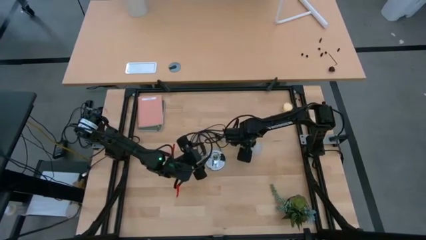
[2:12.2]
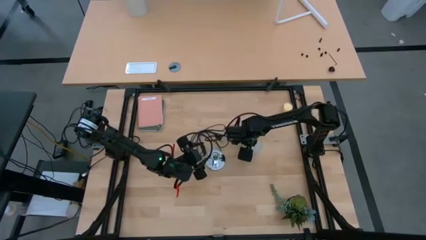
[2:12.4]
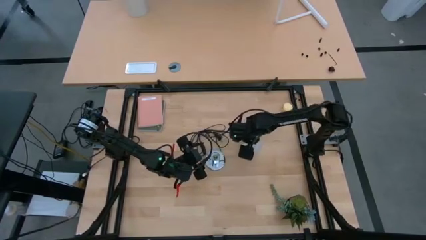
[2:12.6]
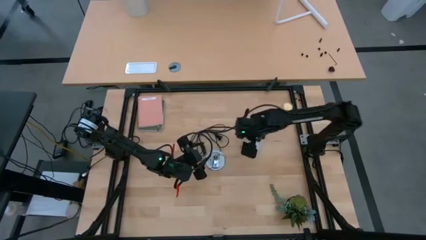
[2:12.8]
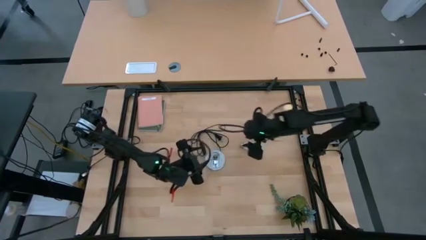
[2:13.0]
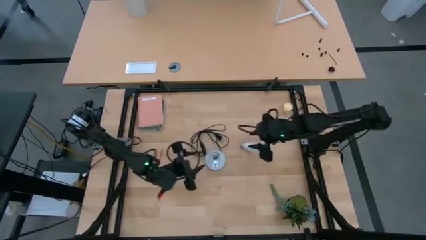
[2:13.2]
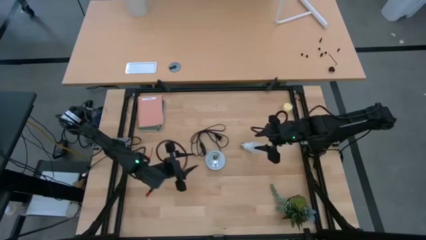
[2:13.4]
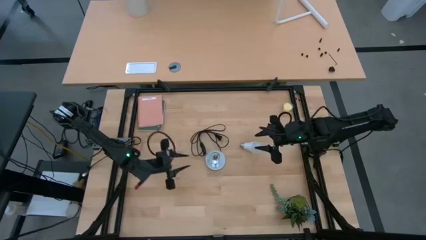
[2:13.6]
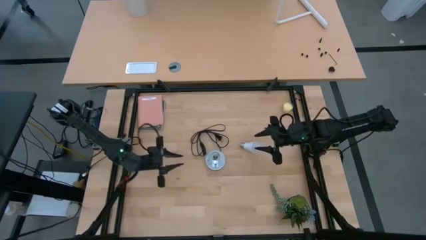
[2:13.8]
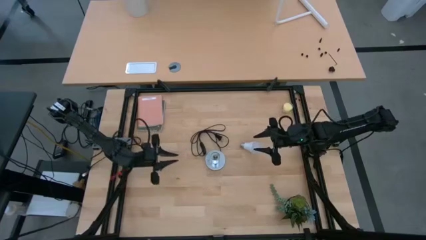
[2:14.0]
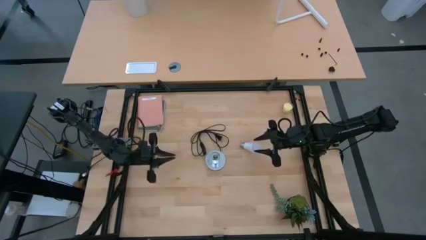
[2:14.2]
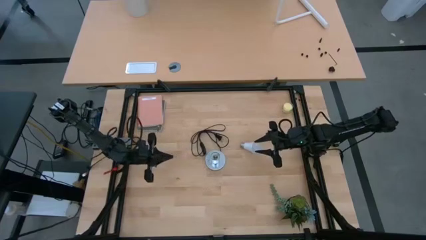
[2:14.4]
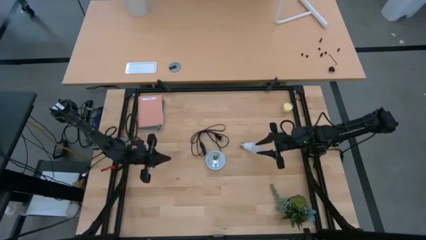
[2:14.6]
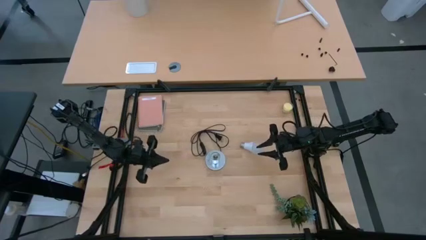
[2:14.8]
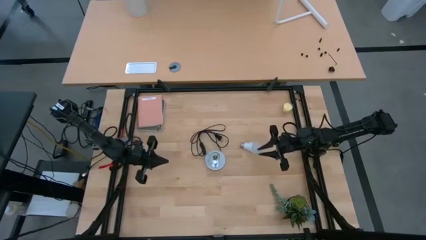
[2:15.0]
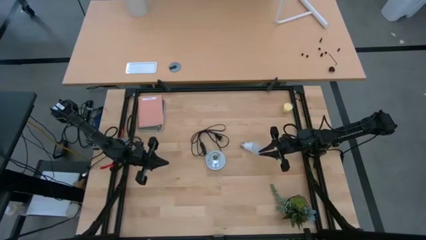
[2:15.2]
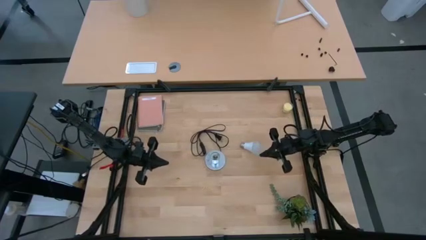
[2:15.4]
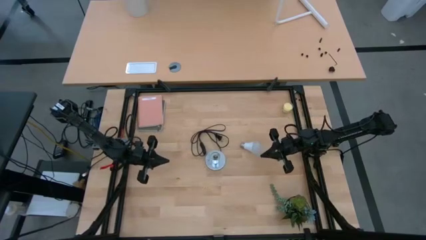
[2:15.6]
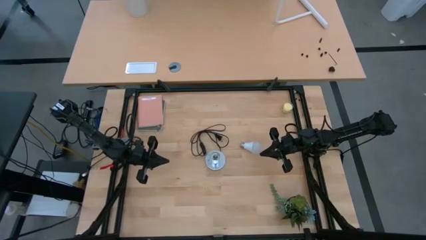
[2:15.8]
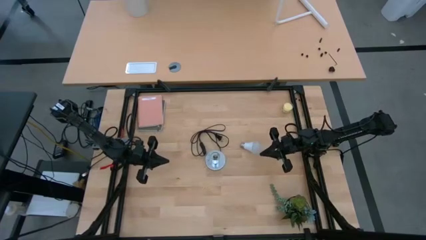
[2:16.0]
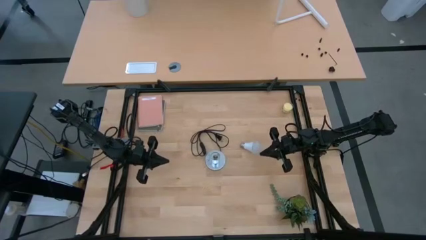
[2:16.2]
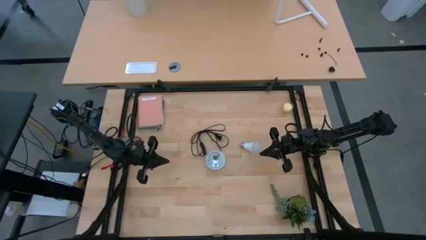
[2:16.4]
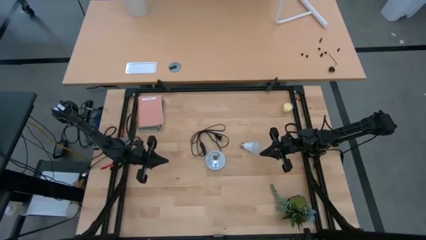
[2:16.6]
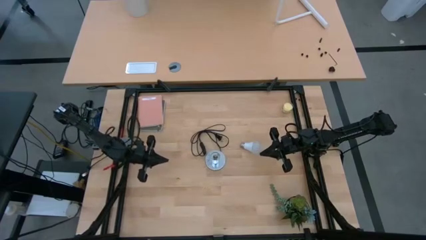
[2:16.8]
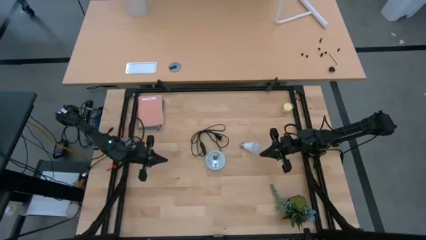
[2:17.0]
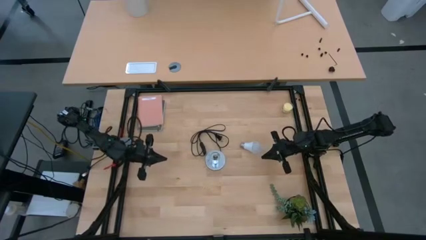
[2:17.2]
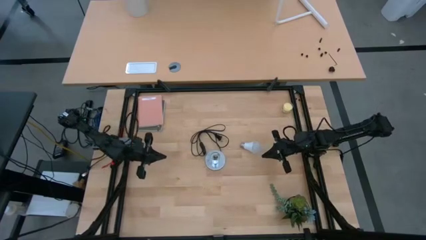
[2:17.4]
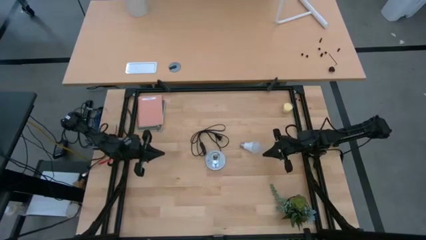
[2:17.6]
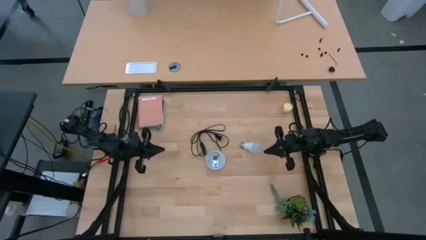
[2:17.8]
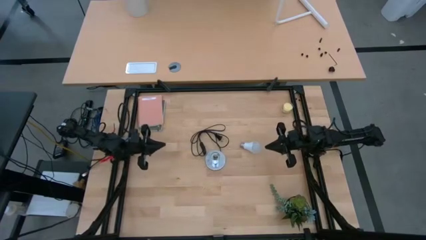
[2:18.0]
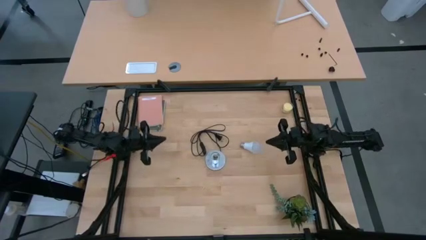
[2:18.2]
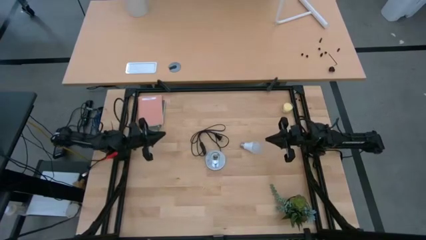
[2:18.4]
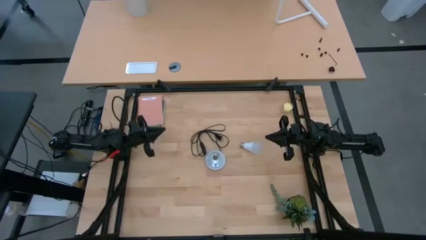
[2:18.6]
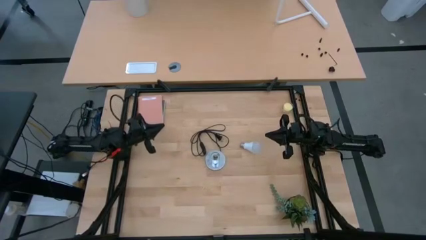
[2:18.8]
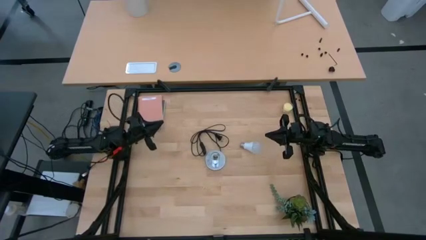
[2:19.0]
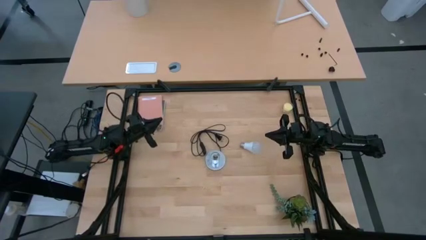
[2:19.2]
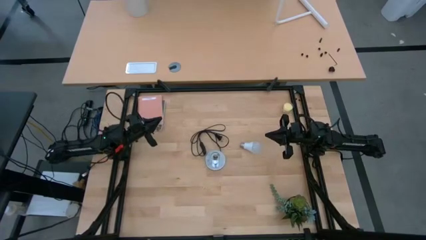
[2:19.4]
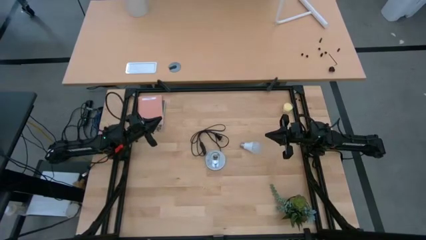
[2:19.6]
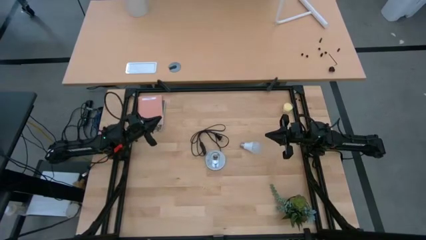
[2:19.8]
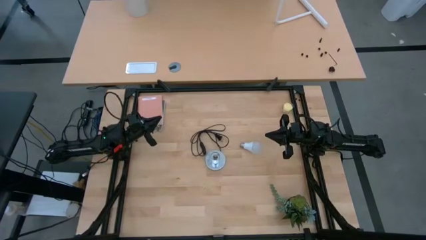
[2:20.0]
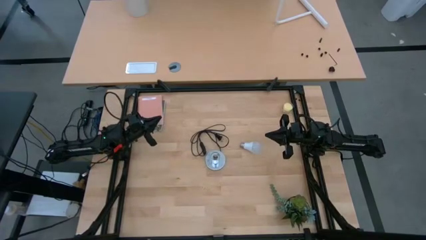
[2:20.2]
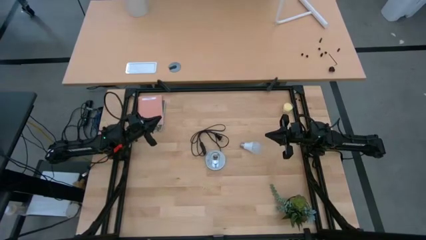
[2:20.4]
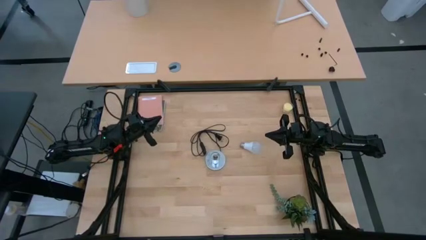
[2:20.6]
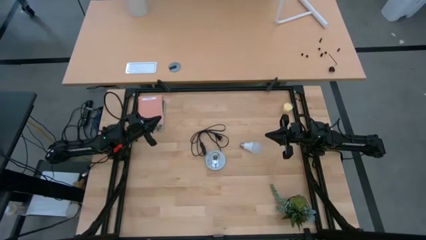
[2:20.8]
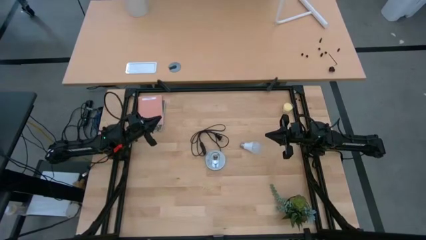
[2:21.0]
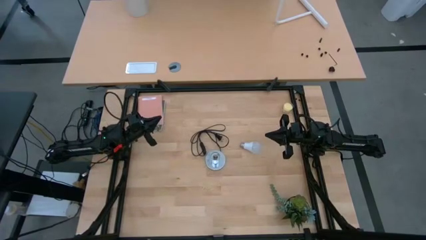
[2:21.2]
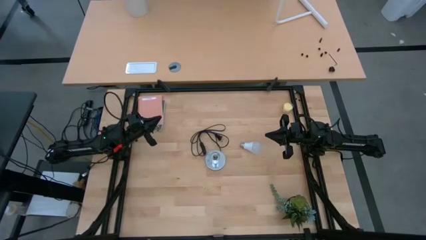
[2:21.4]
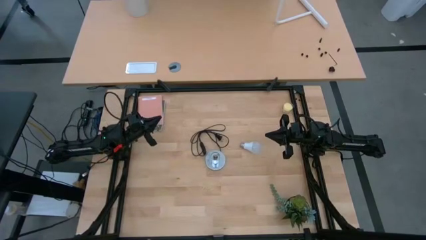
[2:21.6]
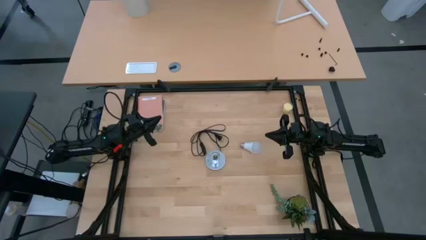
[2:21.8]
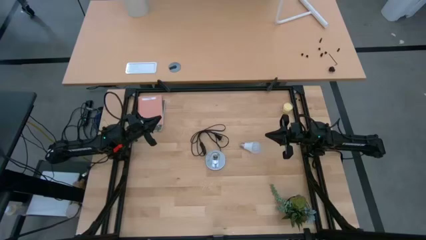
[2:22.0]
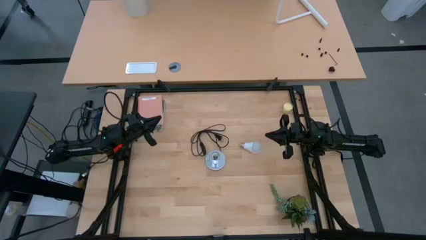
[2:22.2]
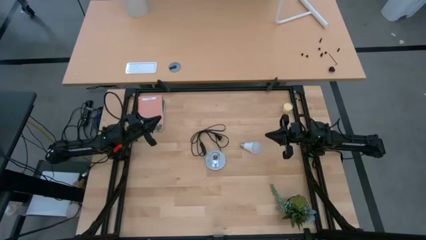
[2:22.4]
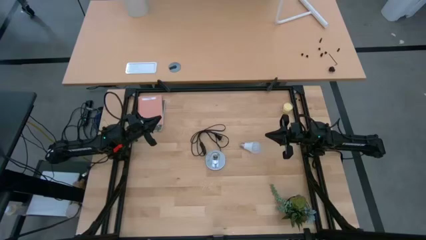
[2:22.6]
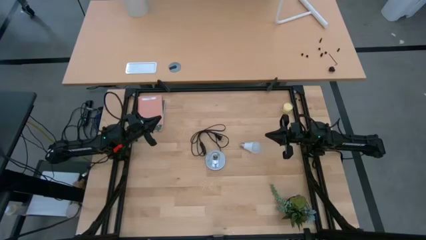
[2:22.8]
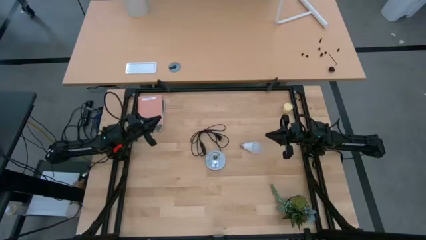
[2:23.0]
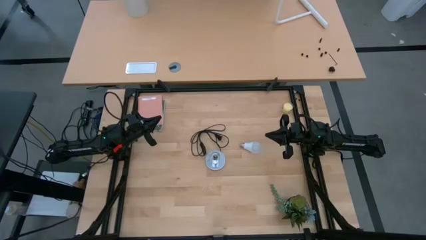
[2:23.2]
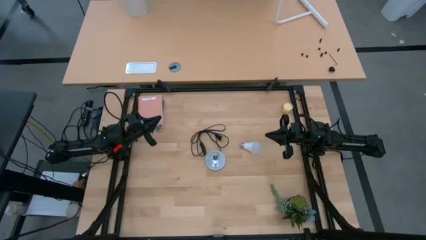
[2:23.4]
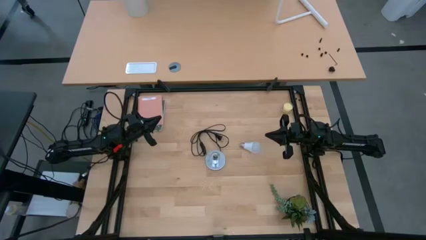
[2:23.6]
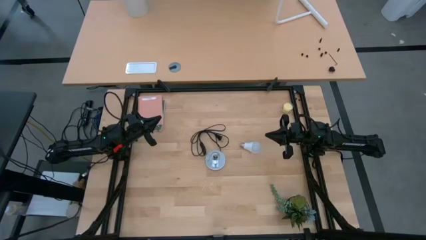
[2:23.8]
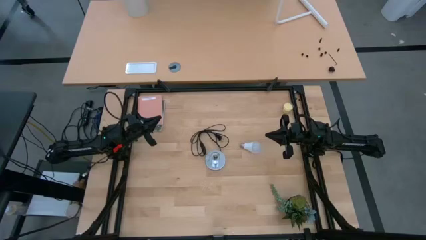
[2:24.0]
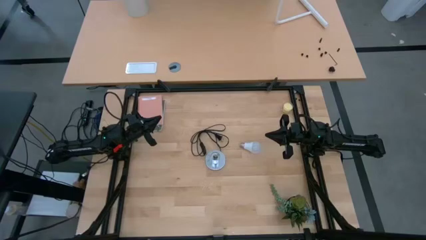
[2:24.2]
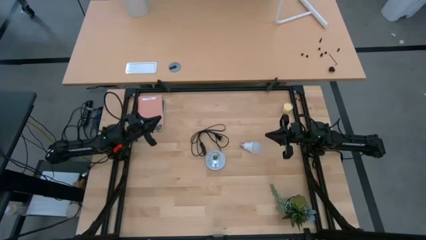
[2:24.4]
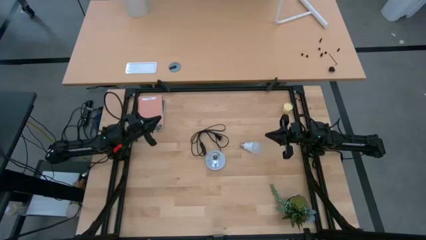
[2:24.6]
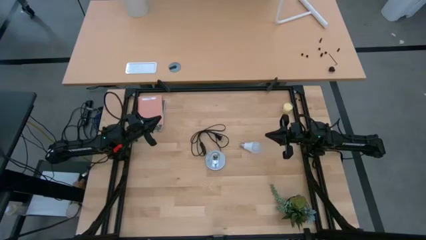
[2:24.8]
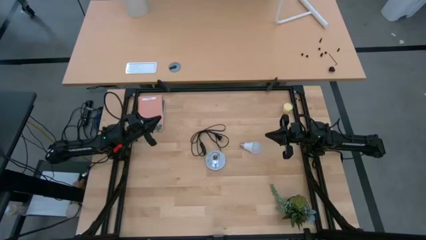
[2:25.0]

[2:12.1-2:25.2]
Task: Screw lightbulb
Return to Home Position
